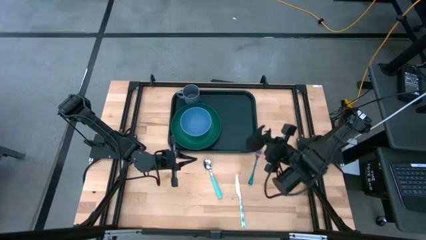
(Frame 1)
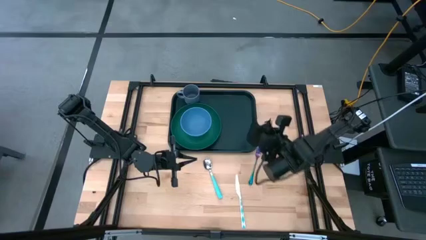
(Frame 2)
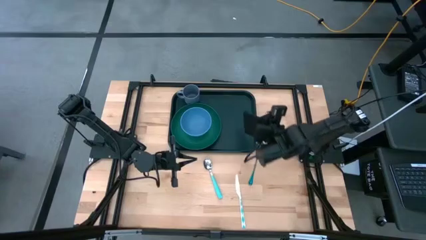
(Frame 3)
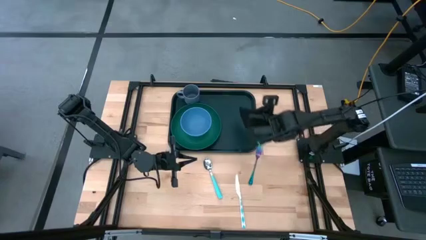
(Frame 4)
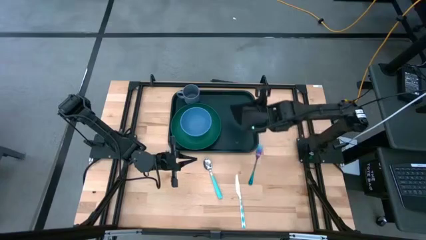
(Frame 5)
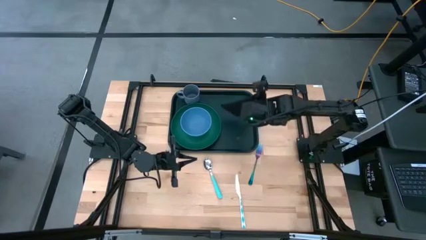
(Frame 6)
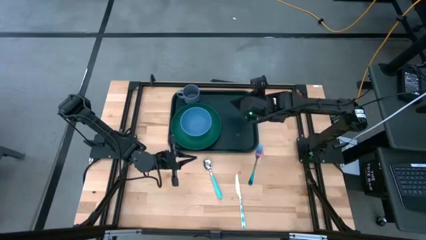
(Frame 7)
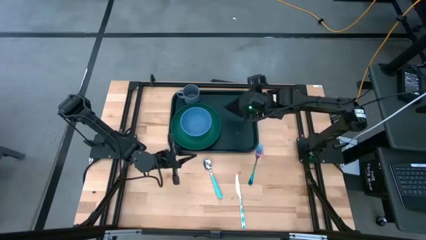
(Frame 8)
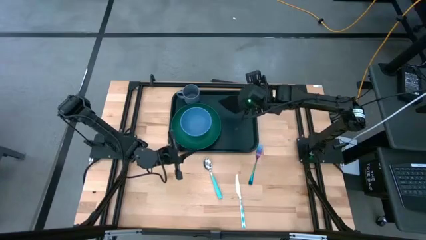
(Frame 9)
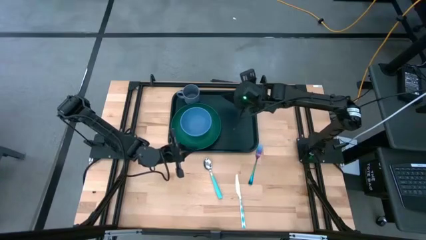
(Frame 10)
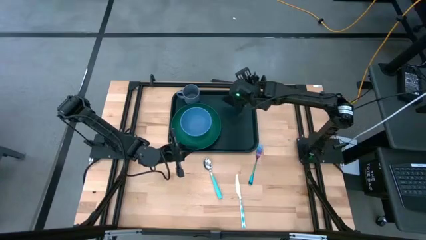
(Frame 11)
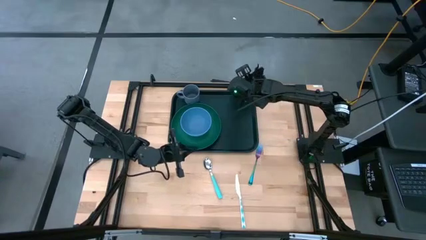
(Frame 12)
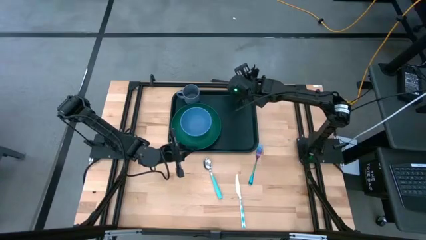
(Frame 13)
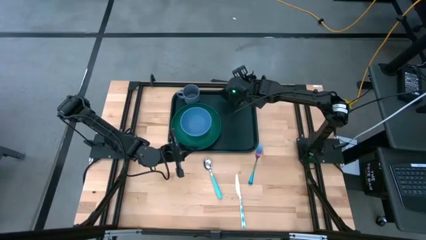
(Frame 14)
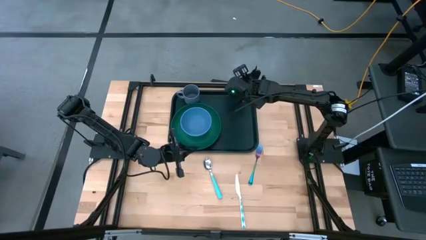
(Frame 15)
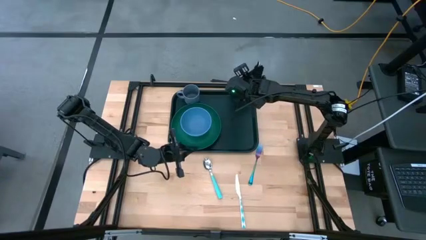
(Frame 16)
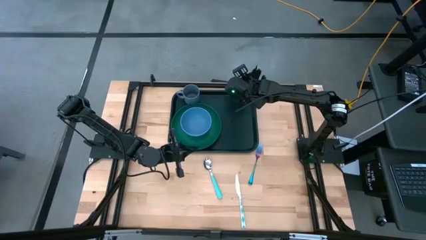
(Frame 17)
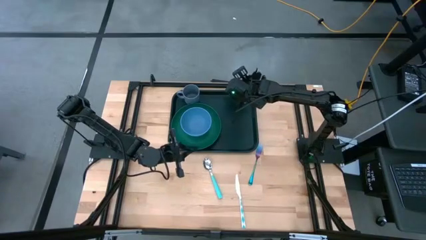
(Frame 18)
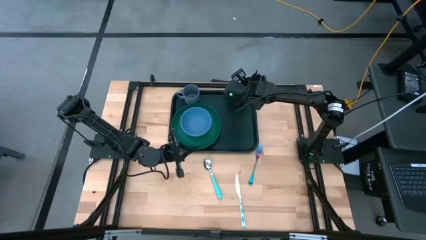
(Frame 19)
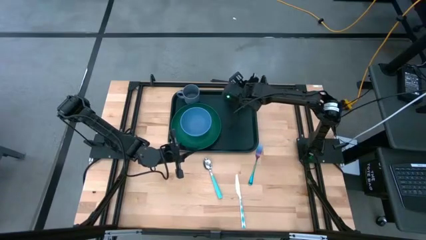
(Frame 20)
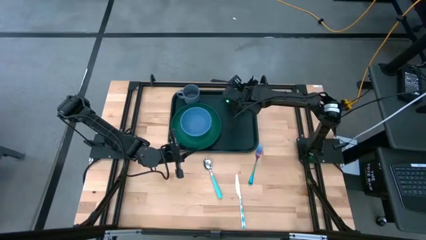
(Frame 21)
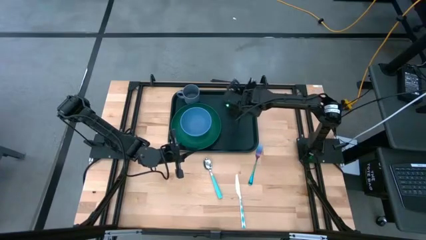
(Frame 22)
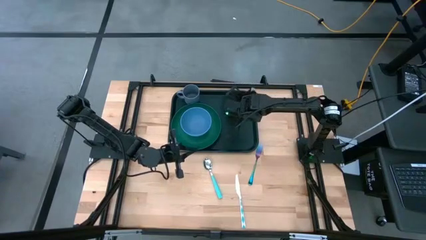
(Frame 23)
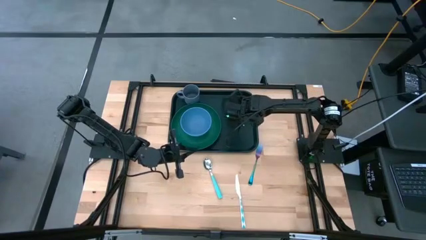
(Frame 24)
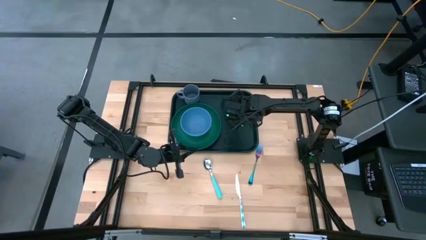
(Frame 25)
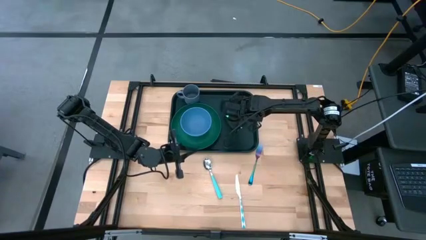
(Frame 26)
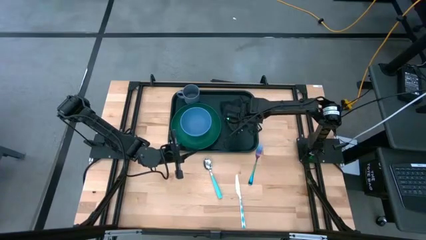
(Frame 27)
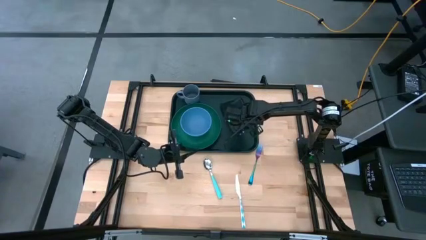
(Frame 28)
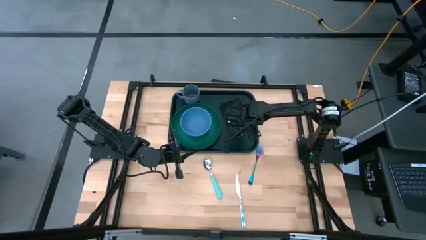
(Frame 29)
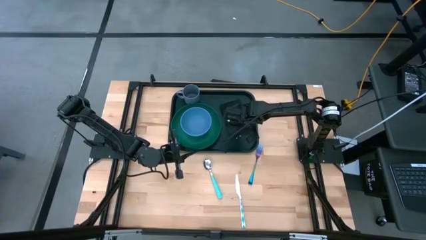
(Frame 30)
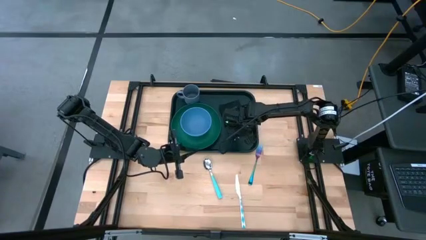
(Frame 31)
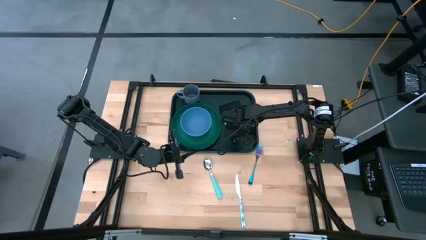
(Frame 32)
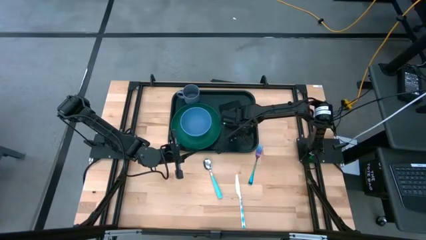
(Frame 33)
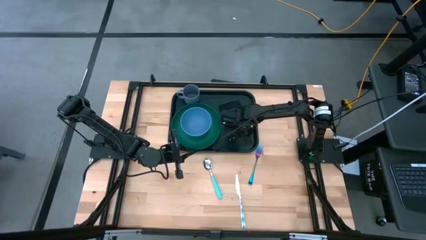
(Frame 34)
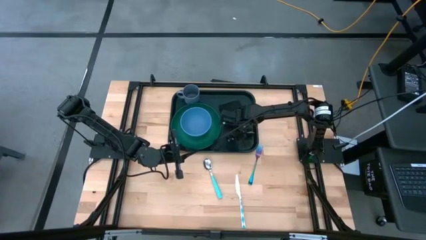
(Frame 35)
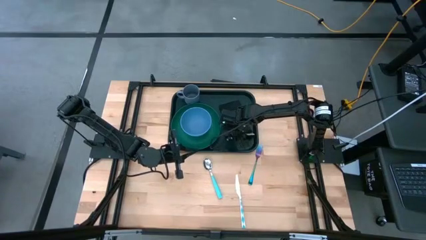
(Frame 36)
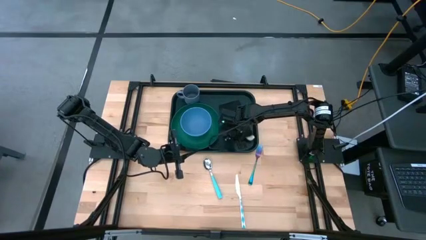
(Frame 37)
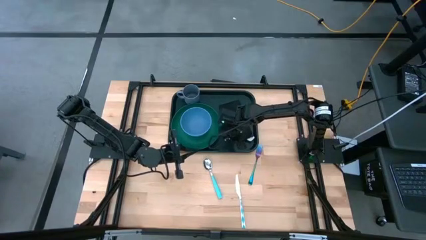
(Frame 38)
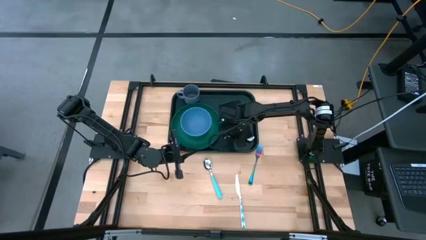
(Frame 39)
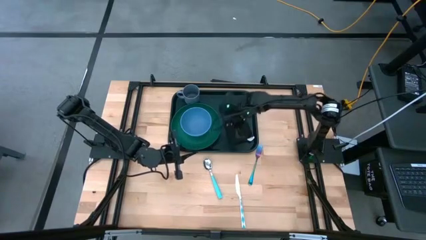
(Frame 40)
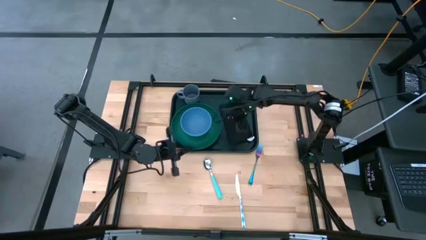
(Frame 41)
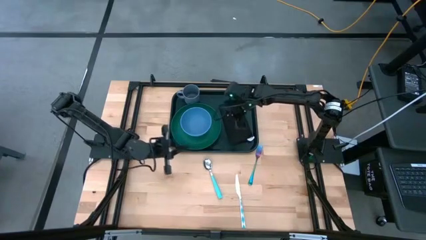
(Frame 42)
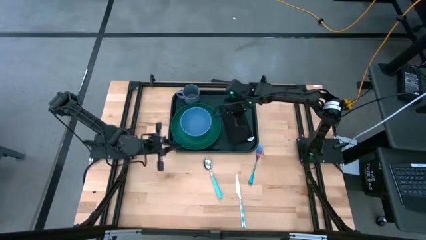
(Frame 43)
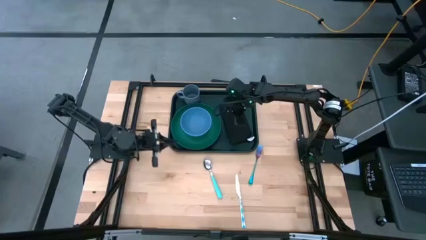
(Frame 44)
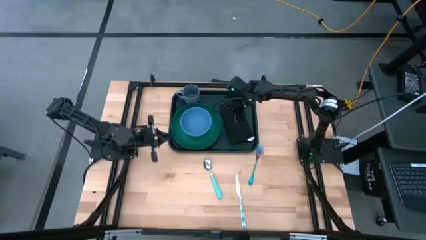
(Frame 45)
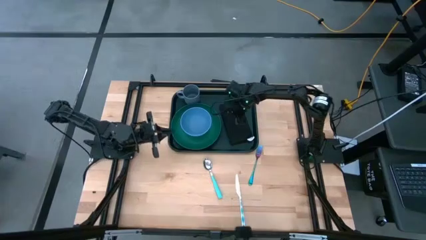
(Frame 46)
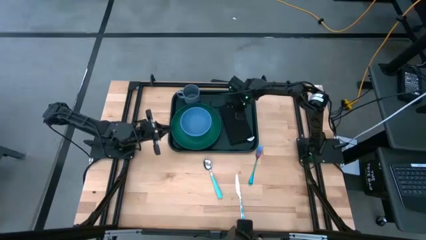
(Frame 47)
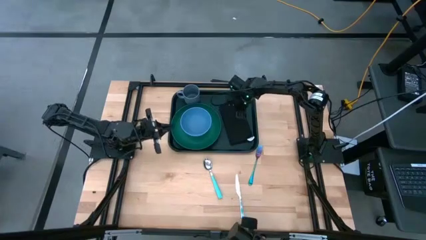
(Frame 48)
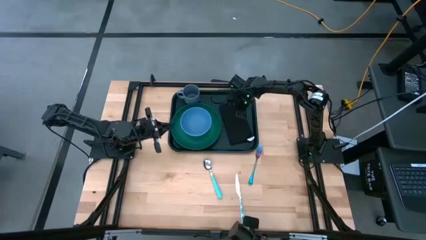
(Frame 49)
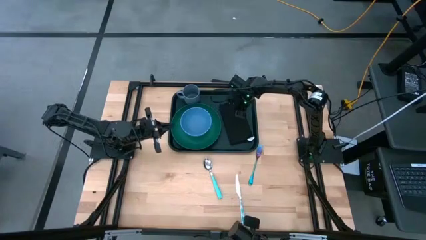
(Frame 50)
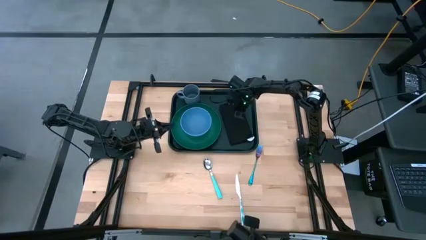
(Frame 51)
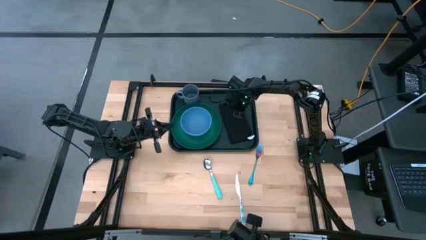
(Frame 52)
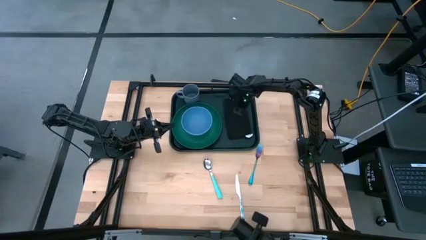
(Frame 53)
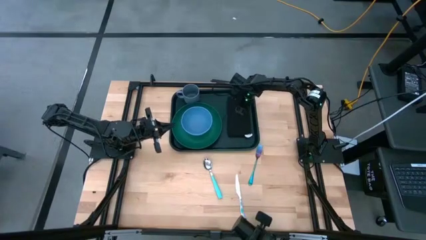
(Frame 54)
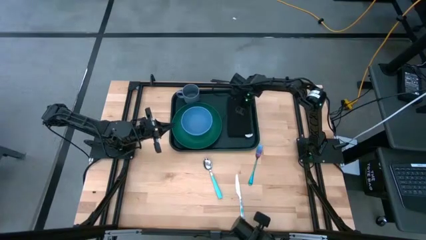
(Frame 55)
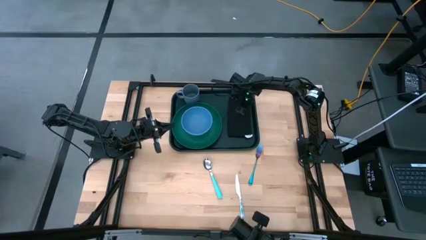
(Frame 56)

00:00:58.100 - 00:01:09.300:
Task: Set up tray
Put the black napkin to the right of the green plate on the black serving tray

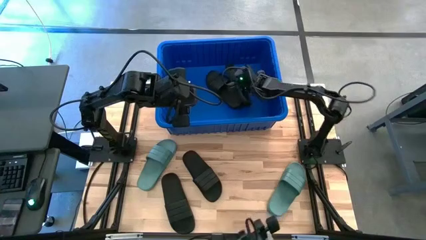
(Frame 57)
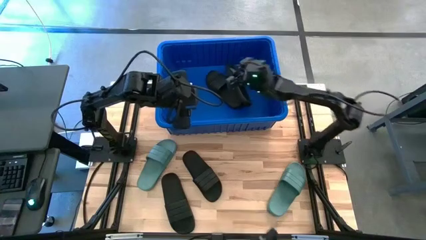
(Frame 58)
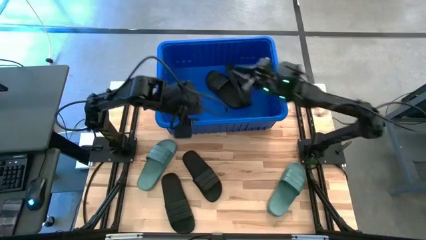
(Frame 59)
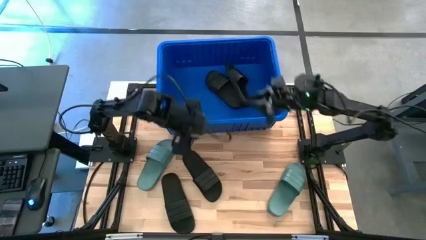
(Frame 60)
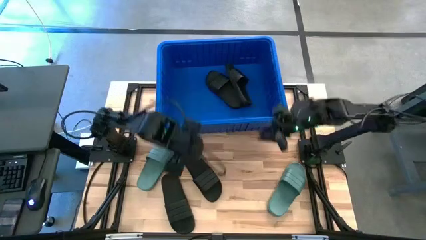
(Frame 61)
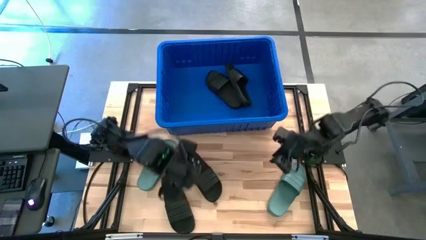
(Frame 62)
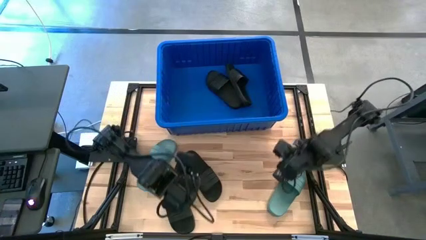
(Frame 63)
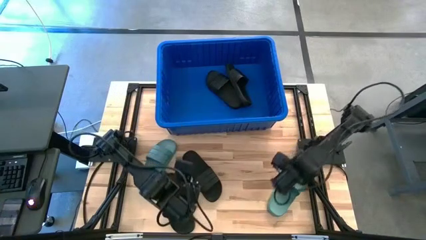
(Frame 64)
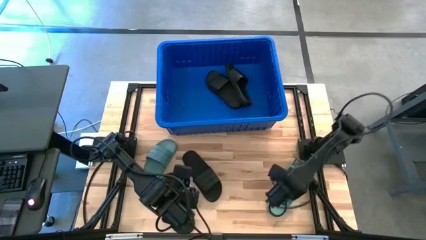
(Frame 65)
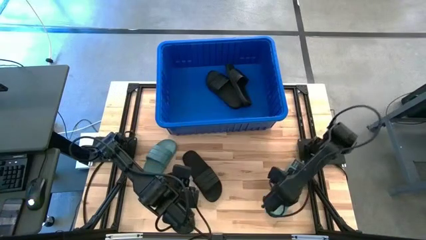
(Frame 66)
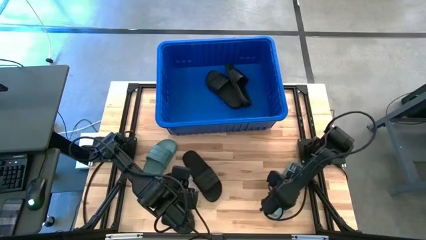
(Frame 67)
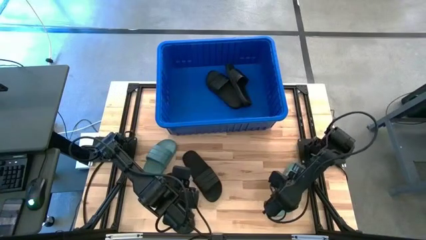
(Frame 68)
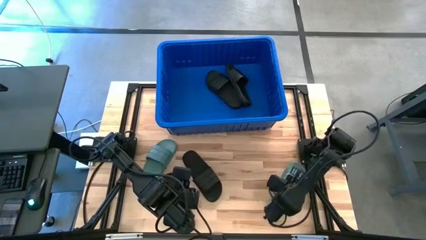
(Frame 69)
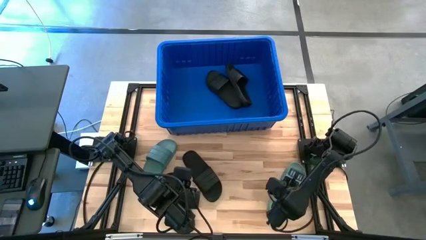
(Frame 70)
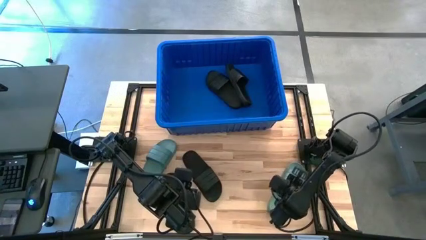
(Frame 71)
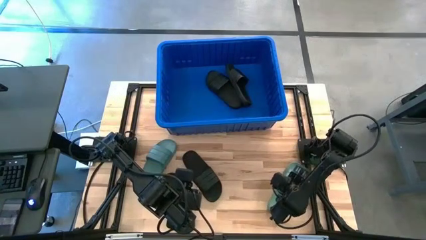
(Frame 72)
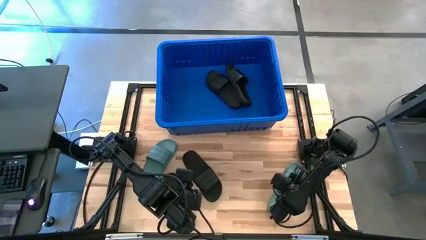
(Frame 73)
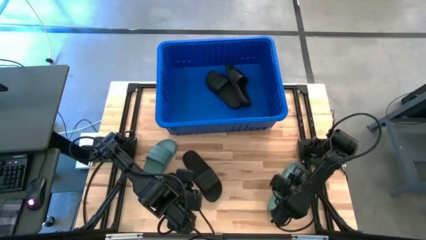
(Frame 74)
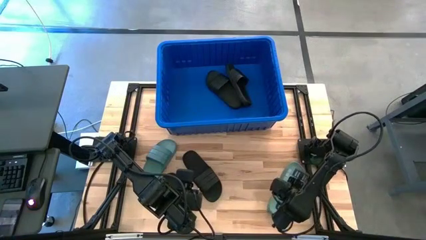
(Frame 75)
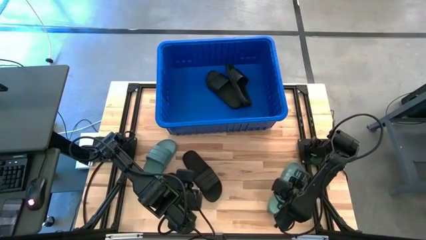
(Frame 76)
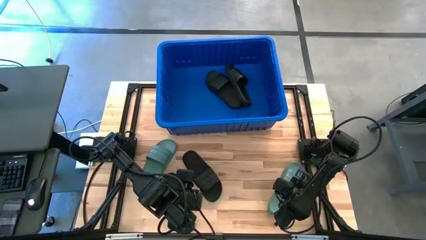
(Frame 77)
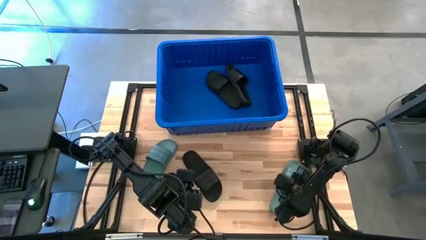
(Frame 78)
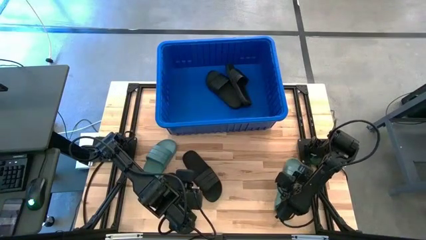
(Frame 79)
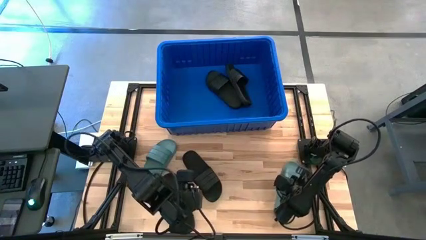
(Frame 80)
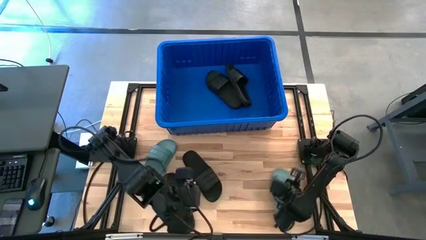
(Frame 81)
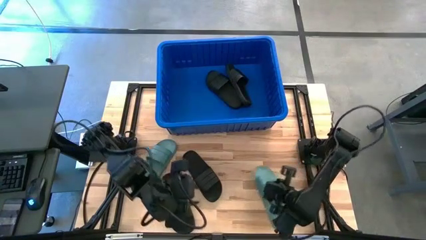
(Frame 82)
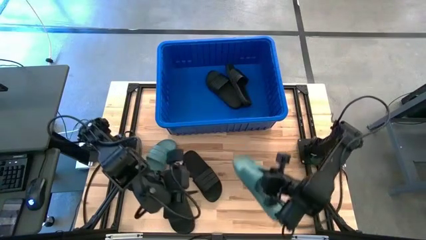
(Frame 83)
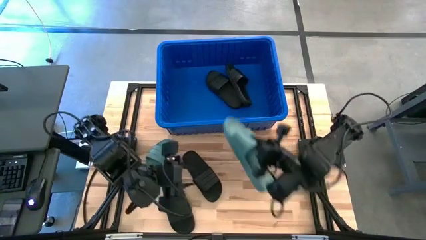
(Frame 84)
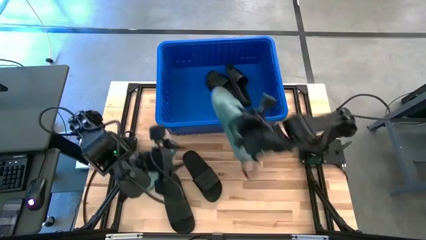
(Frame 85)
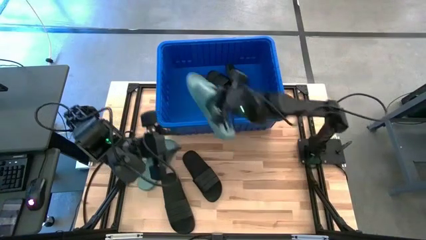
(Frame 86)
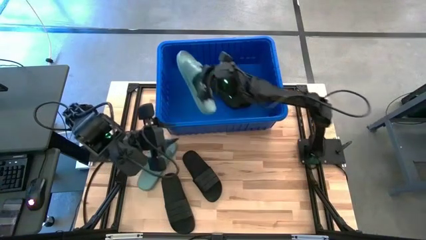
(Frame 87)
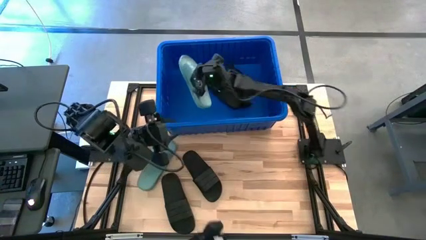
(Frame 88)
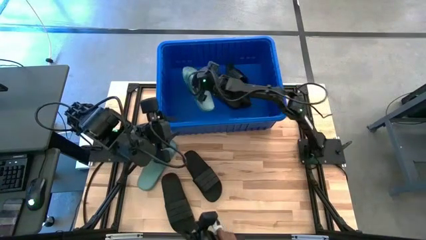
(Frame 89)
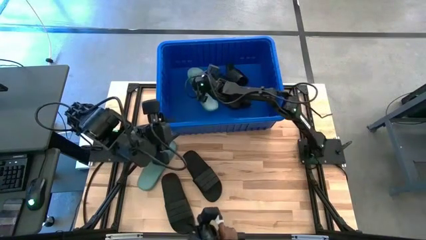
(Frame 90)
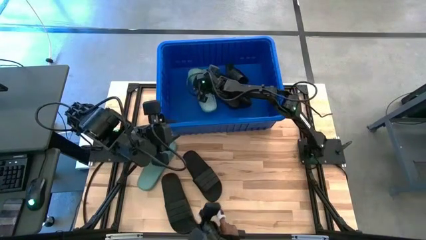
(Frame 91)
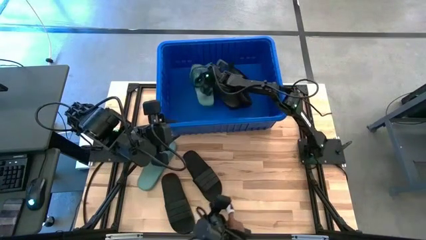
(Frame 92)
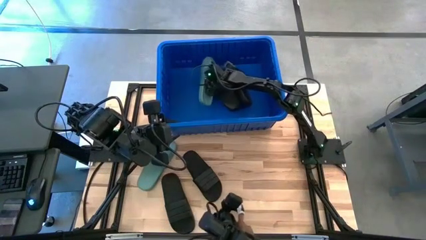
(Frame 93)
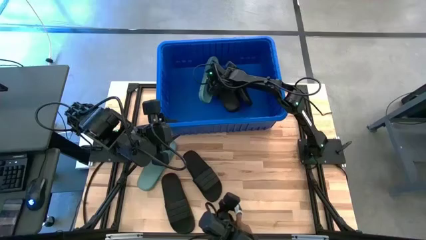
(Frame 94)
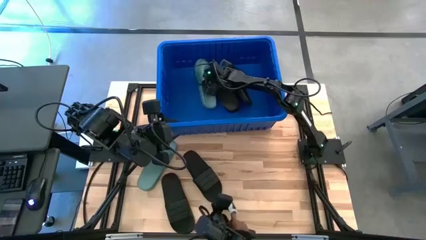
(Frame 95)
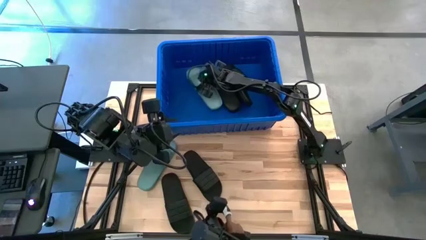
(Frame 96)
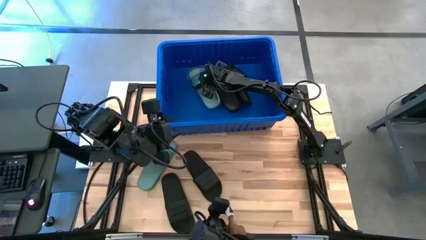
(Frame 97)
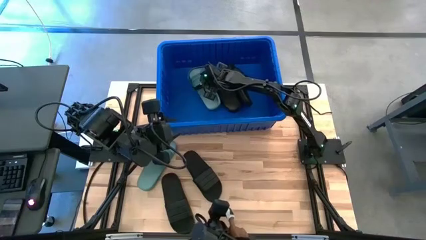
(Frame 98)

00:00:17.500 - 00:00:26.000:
Task: Pick and place slides into bin
Put the green slide into the blue bin
